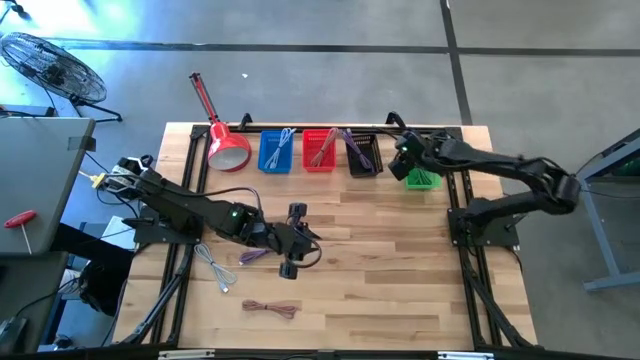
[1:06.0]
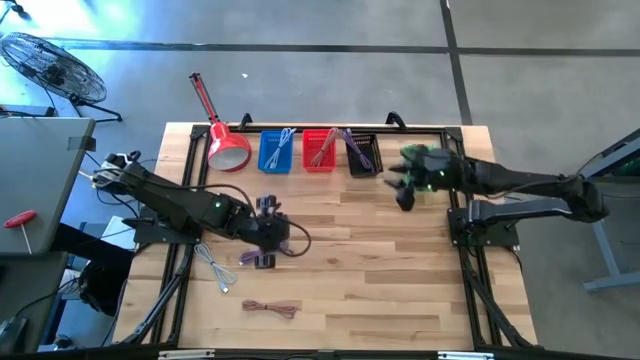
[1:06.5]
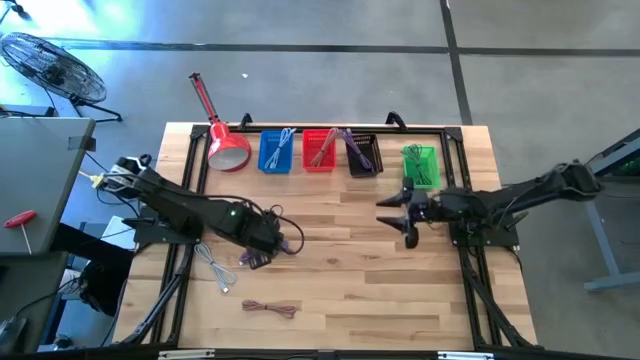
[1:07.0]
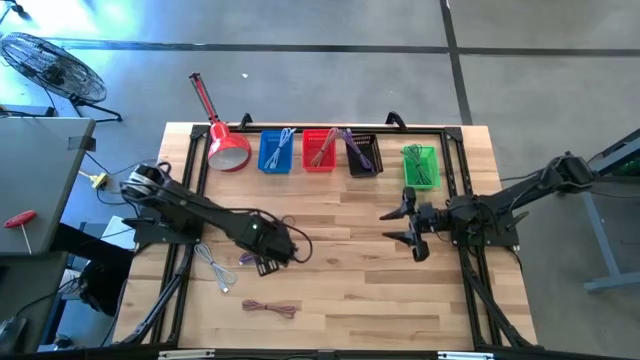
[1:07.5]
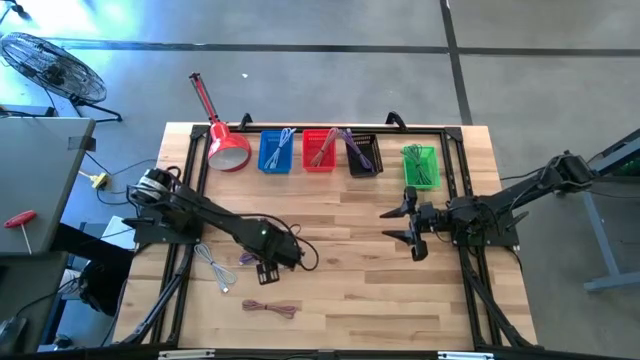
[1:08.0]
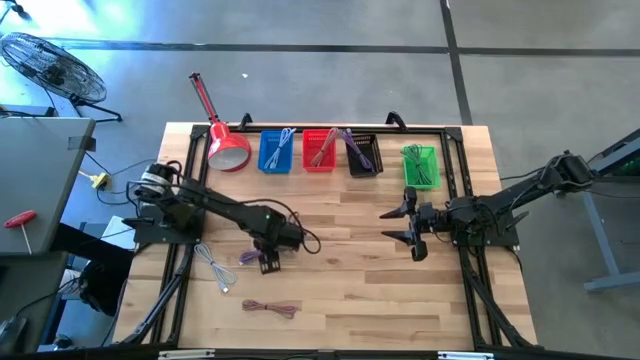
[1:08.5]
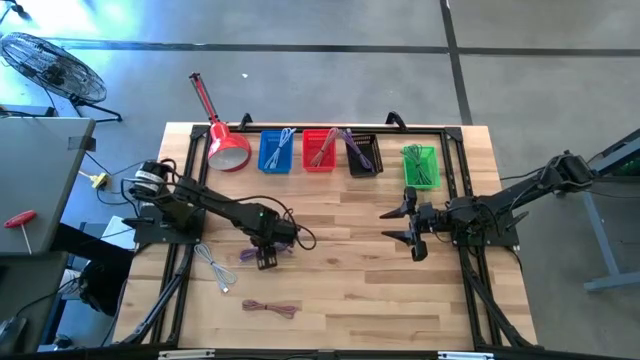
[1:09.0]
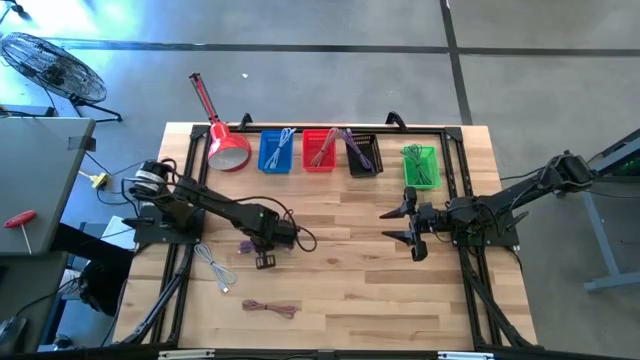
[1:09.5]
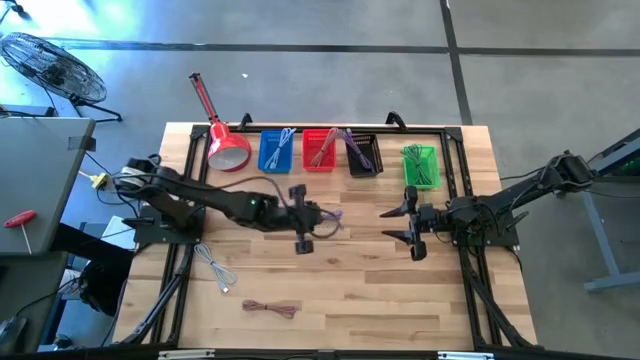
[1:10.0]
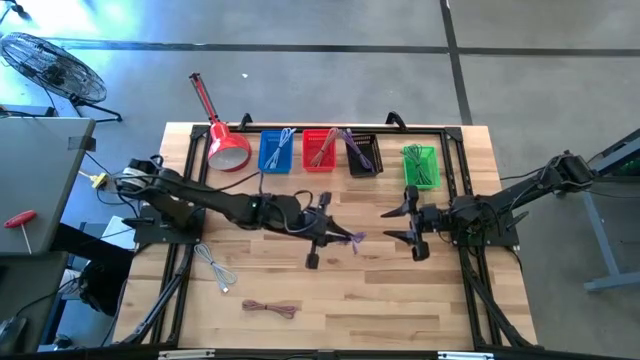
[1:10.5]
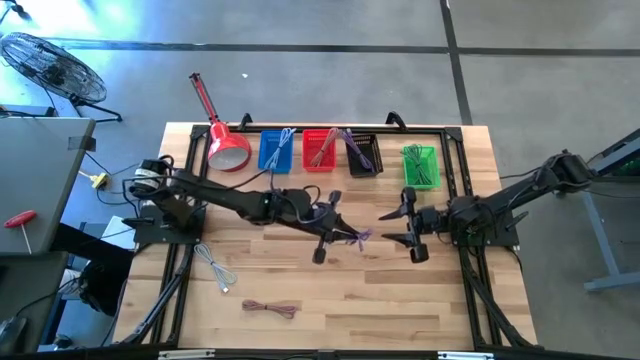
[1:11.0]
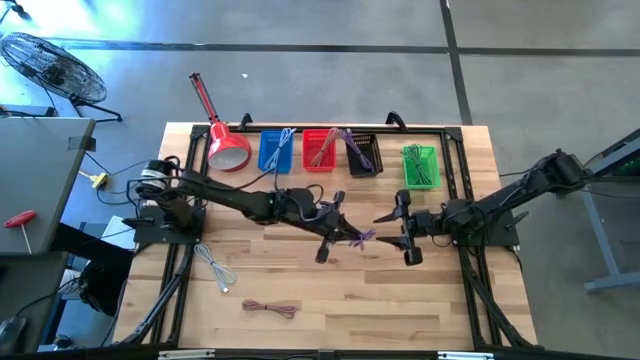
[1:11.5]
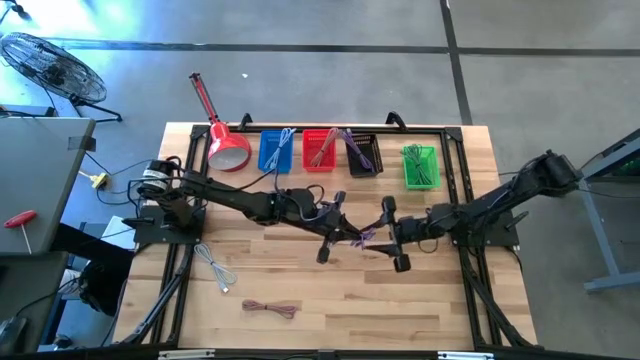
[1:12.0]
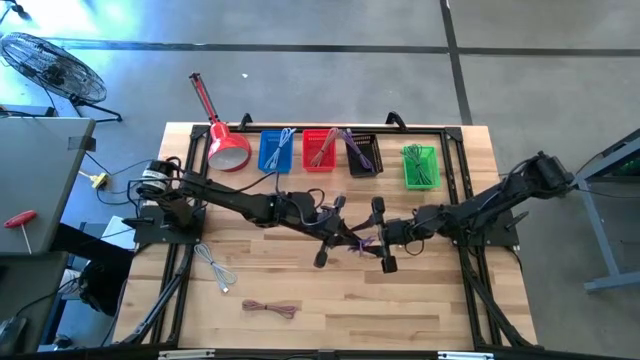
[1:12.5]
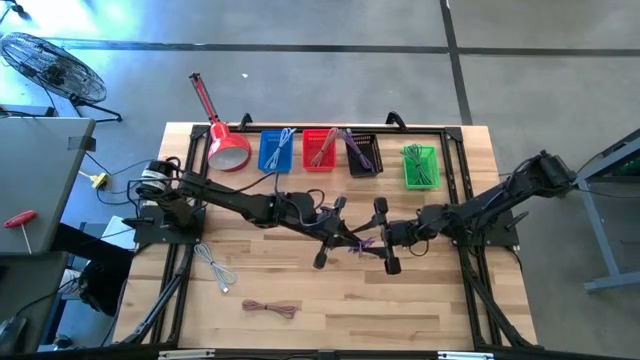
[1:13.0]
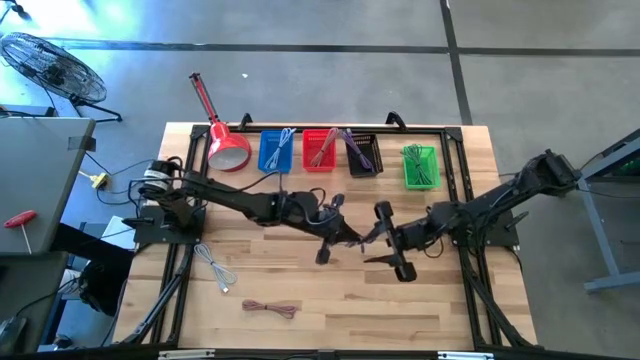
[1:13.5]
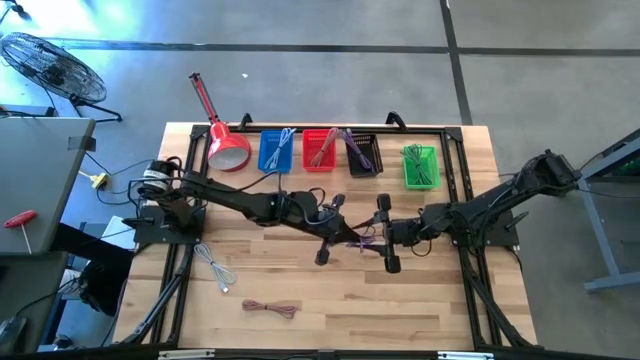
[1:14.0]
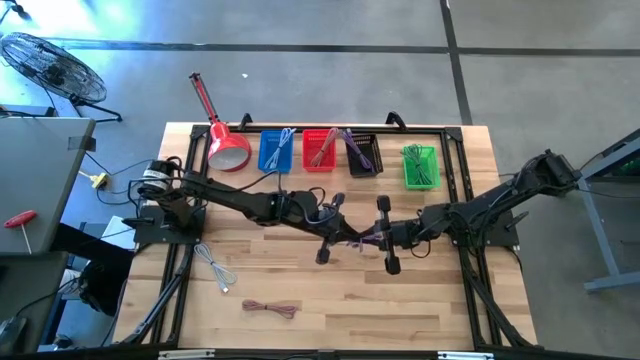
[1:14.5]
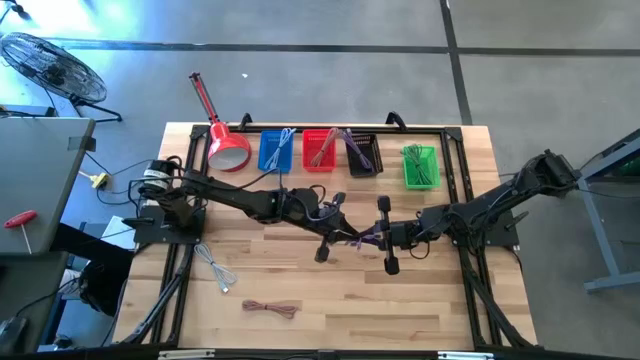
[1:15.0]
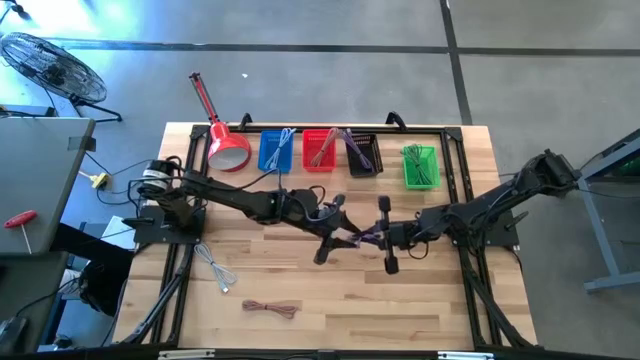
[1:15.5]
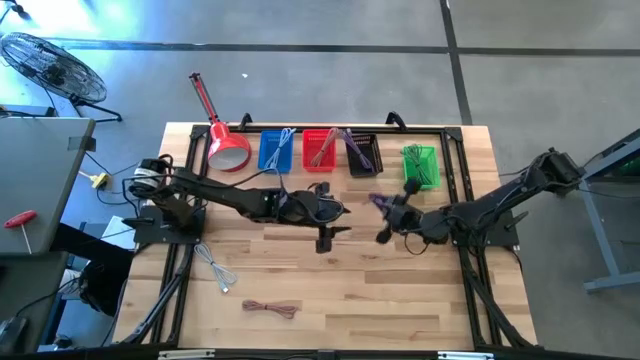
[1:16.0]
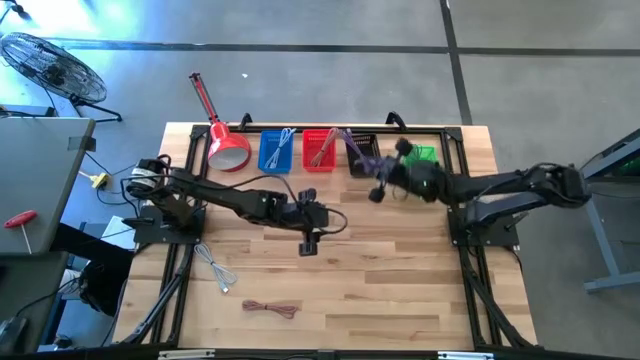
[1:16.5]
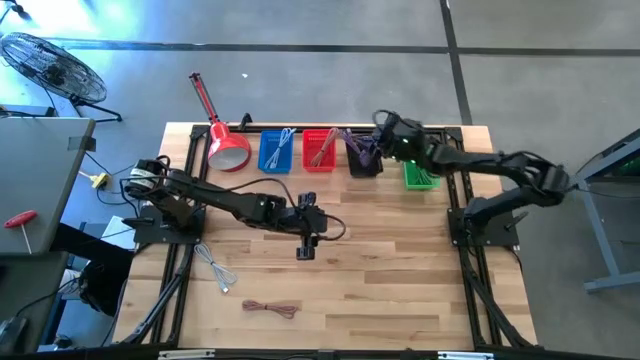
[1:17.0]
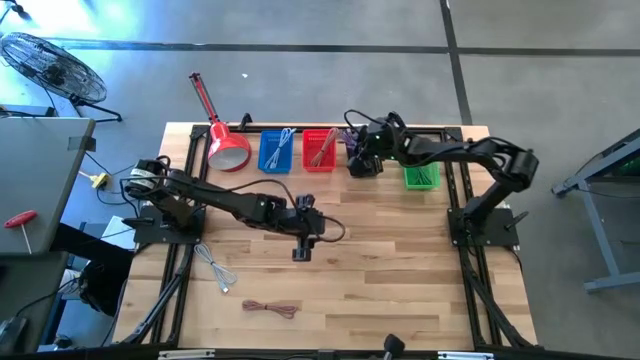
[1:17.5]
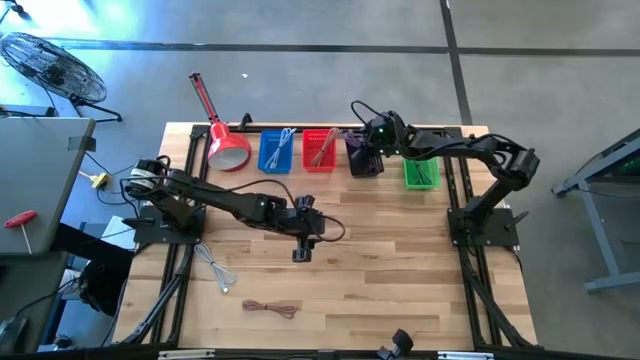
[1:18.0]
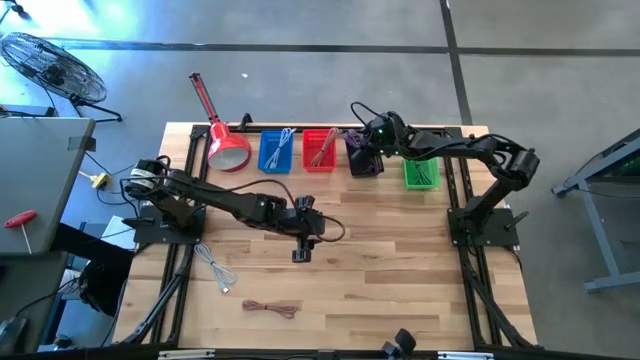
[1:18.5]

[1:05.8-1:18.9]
Task: Pick & Place USB Port
Put the violet charger cable into the black bin

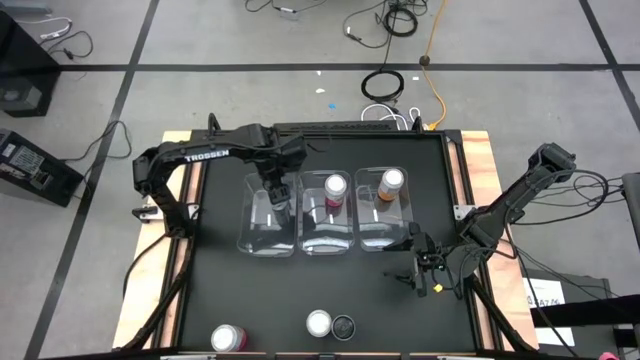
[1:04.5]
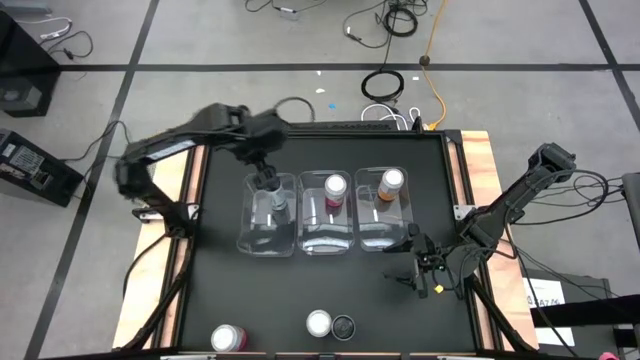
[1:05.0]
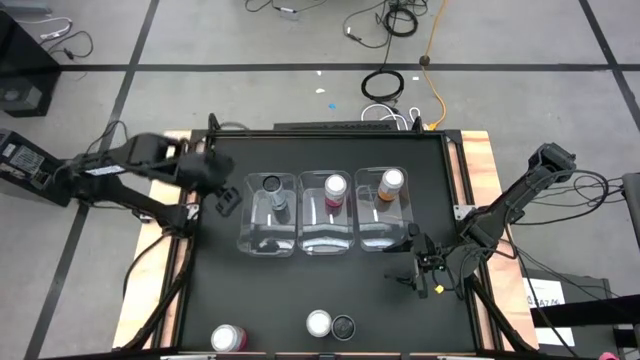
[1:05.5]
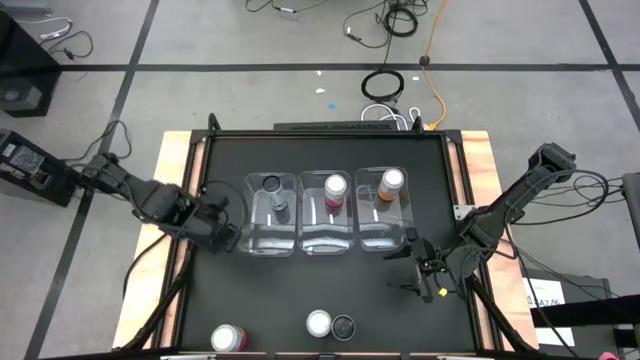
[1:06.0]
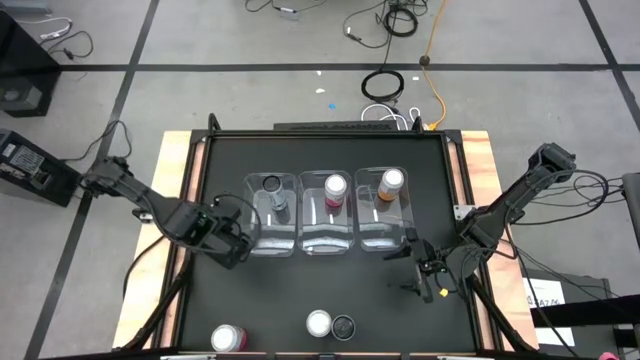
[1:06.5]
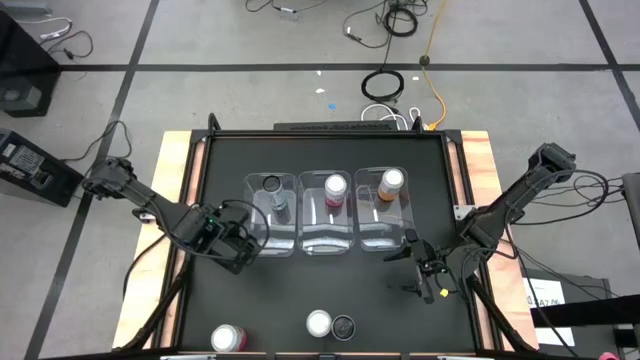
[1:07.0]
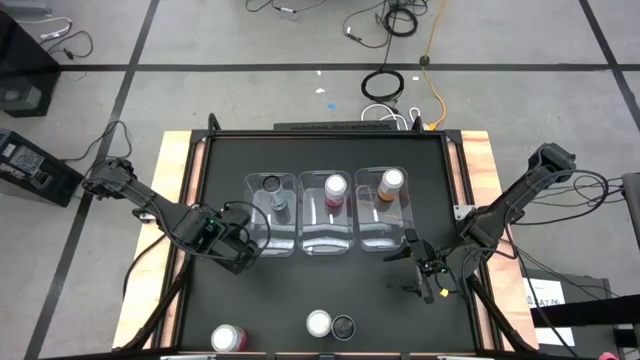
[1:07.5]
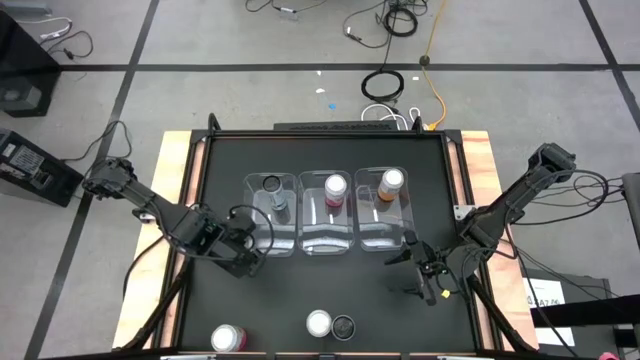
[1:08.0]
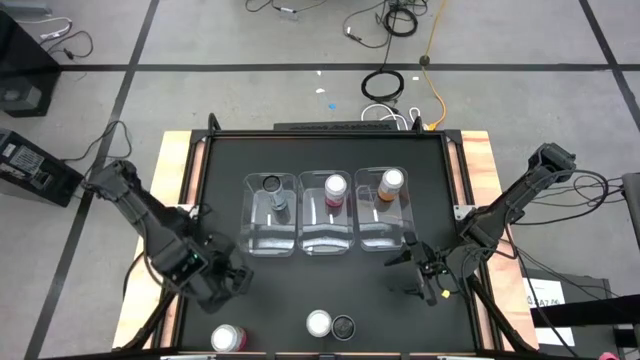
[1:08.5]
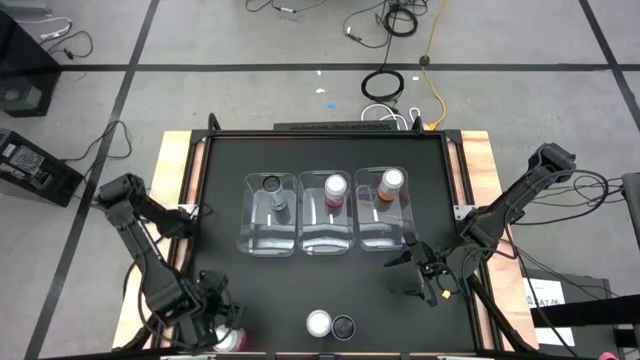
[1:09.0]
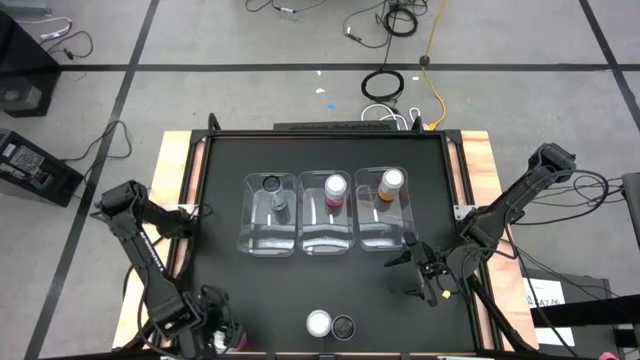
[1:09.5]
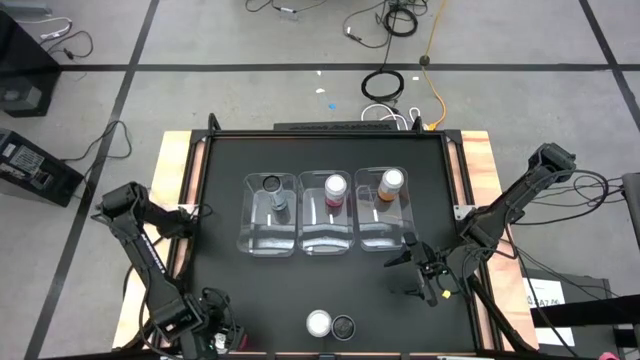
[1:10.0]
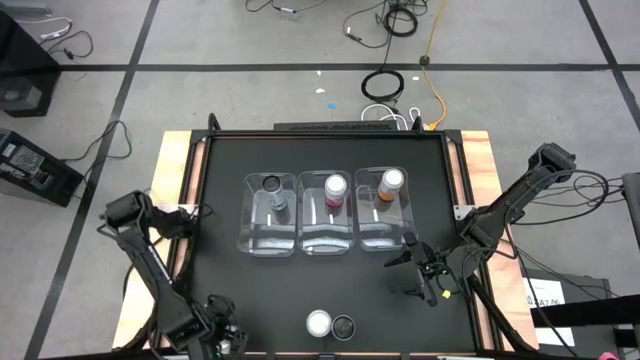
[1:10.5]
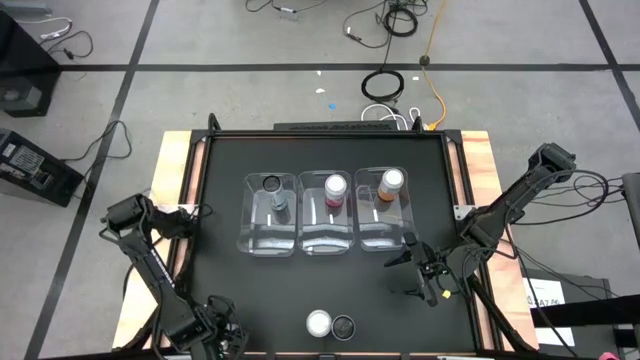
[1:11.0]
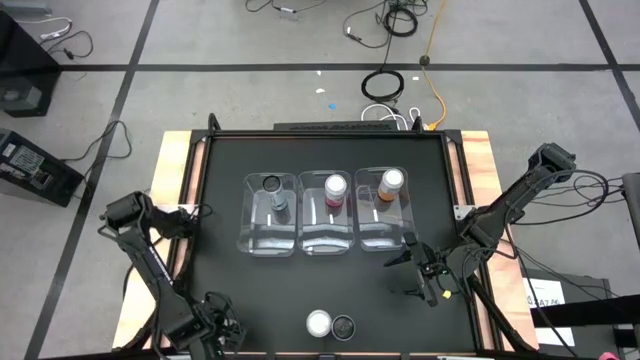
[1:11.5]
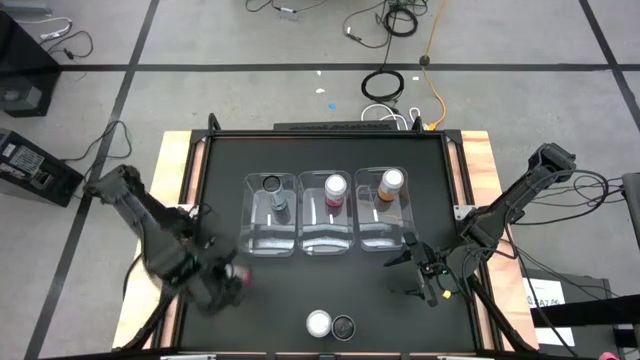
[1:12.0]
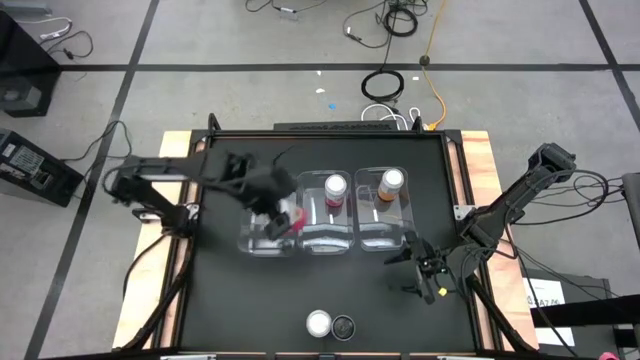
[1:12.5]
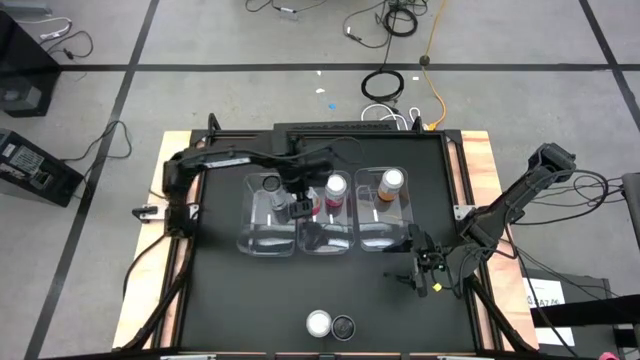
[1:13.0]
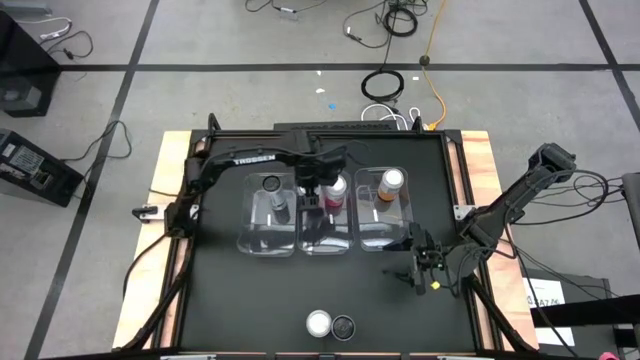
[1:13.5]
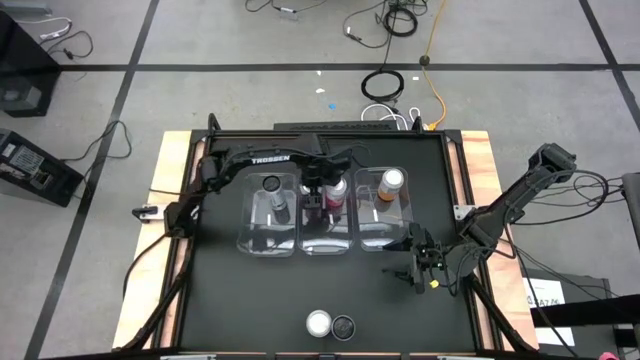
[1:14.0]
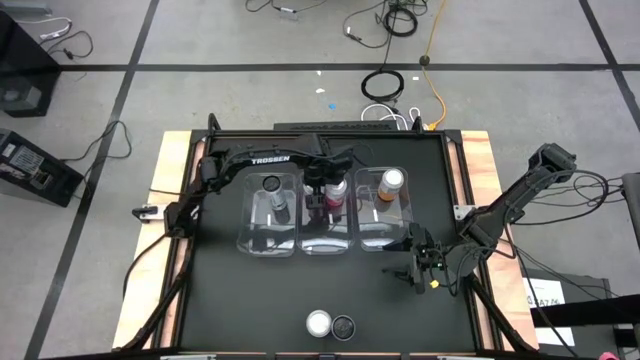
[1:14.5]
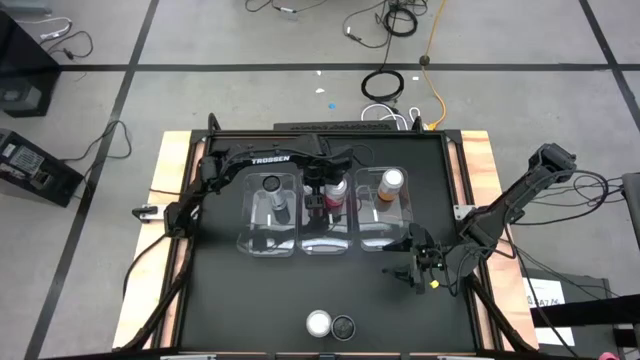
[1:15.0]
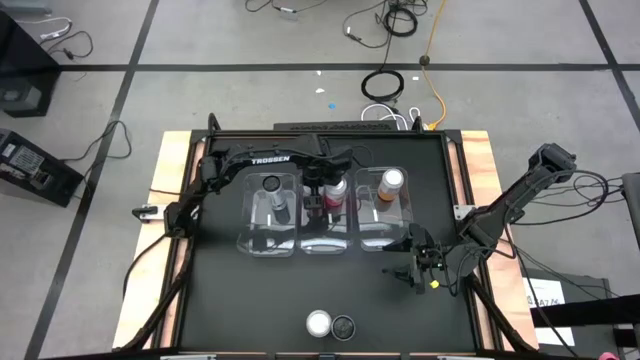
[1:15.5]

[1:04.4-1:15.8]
Task: Sort soda cans
Put the pink soda can into the center transparent bin
